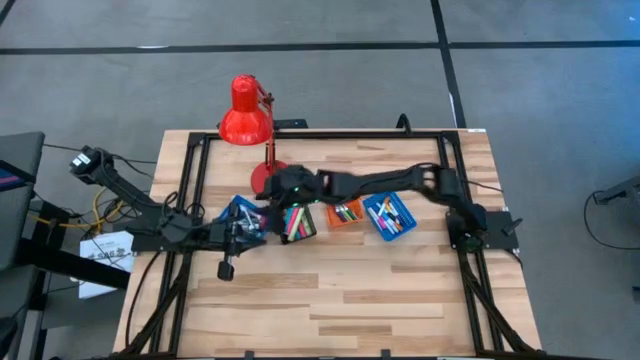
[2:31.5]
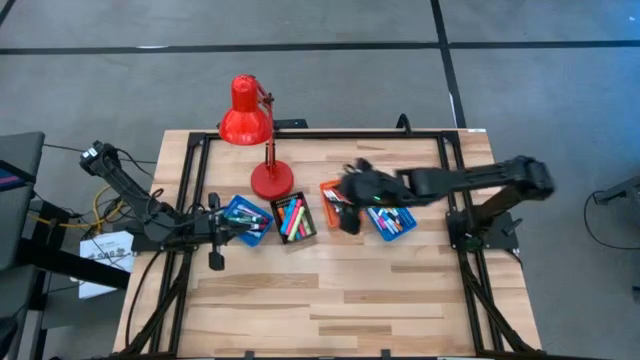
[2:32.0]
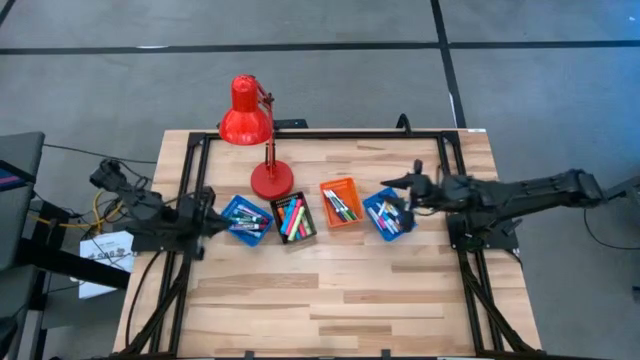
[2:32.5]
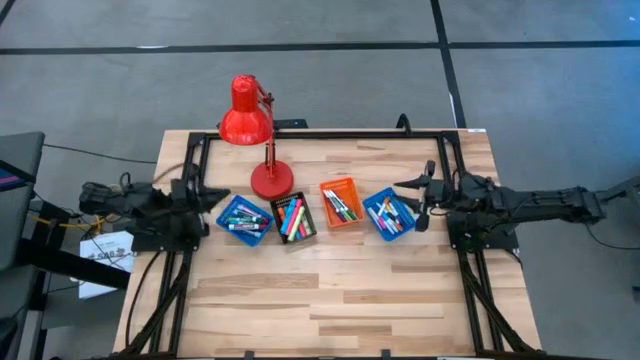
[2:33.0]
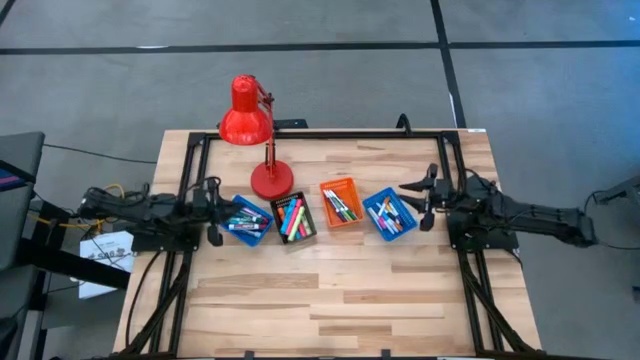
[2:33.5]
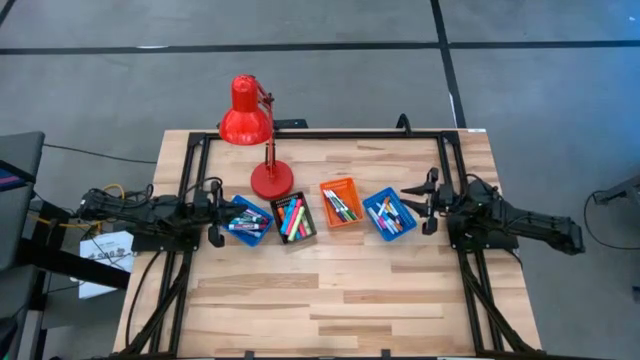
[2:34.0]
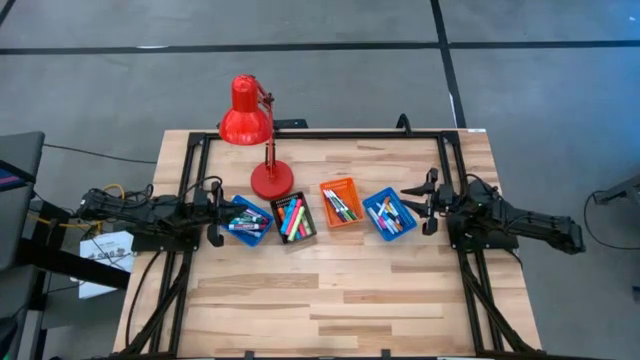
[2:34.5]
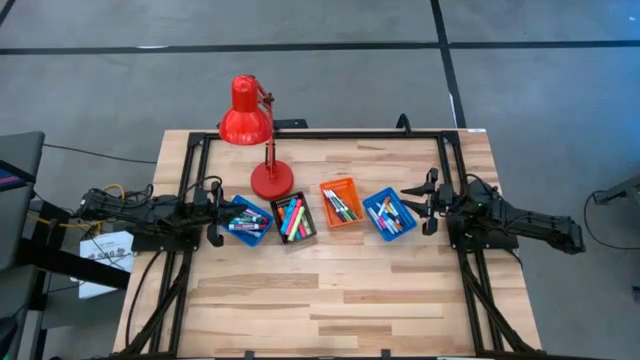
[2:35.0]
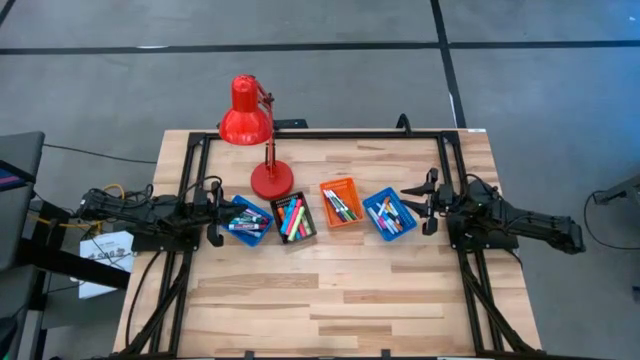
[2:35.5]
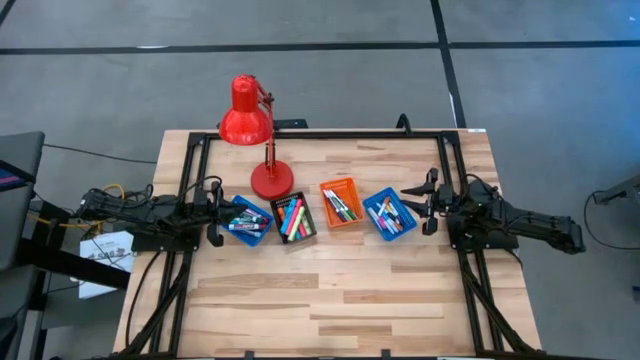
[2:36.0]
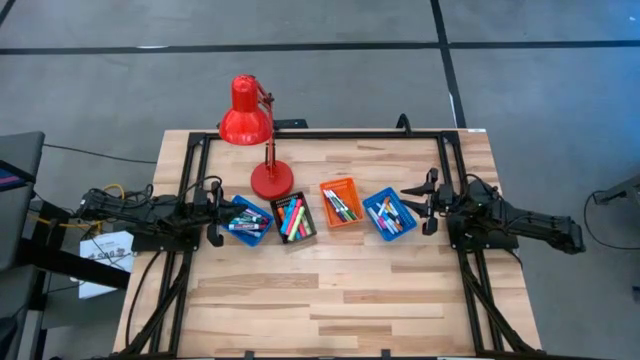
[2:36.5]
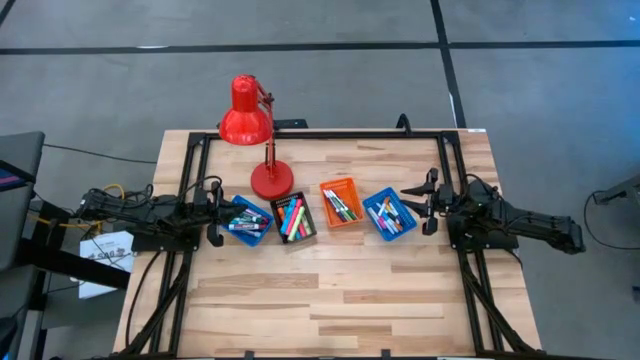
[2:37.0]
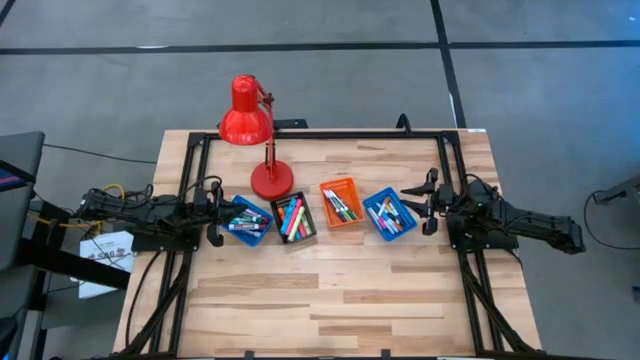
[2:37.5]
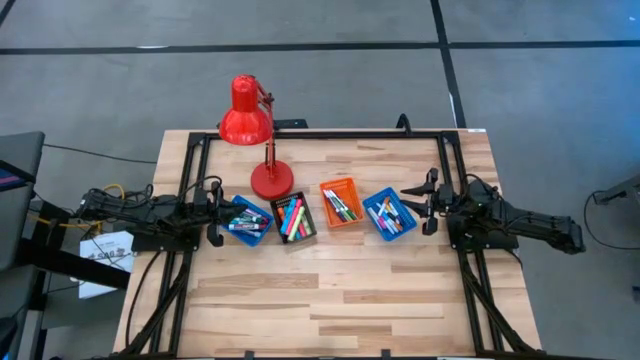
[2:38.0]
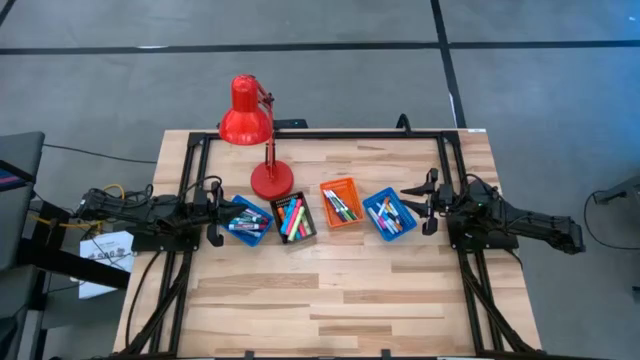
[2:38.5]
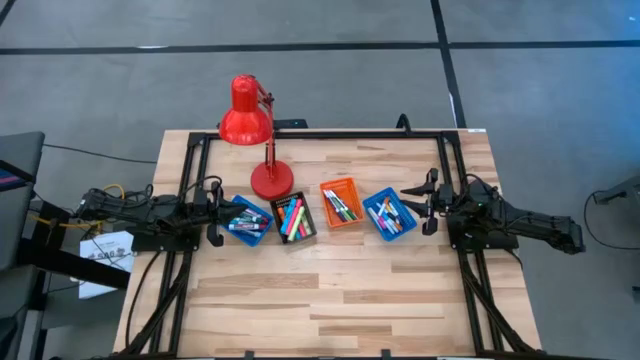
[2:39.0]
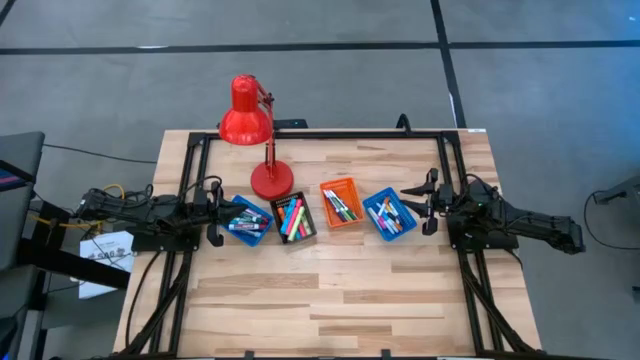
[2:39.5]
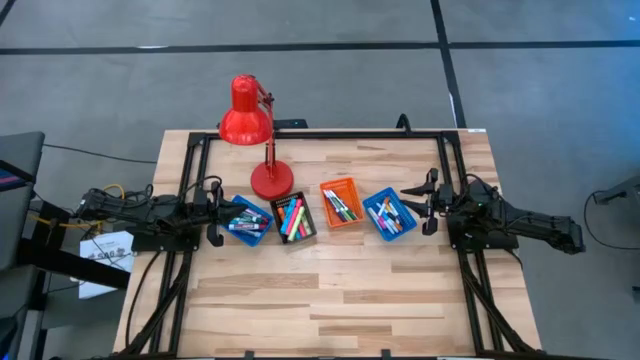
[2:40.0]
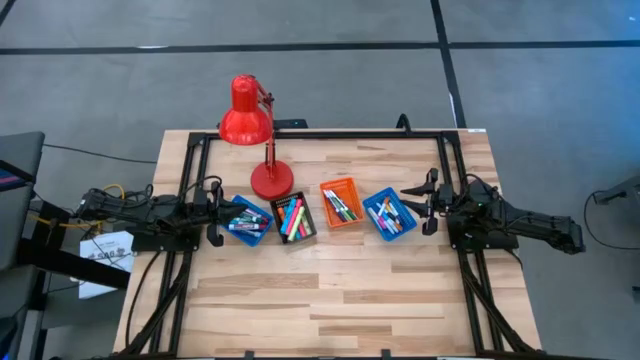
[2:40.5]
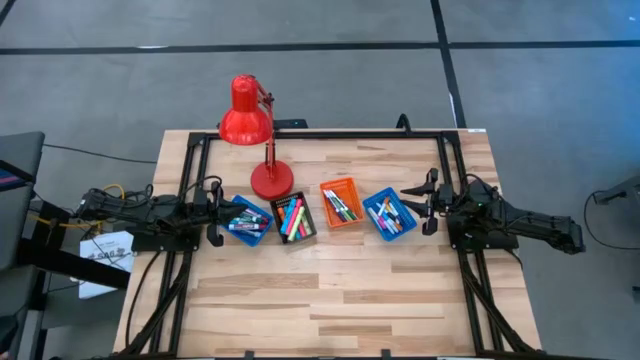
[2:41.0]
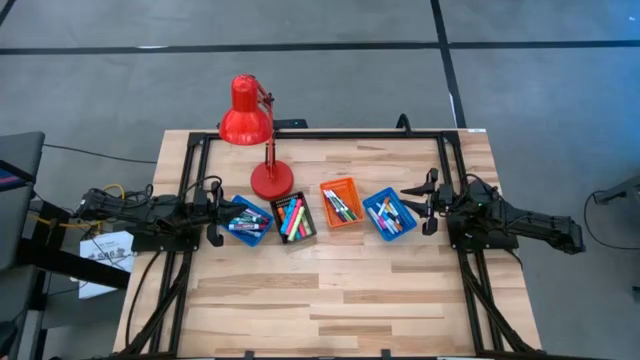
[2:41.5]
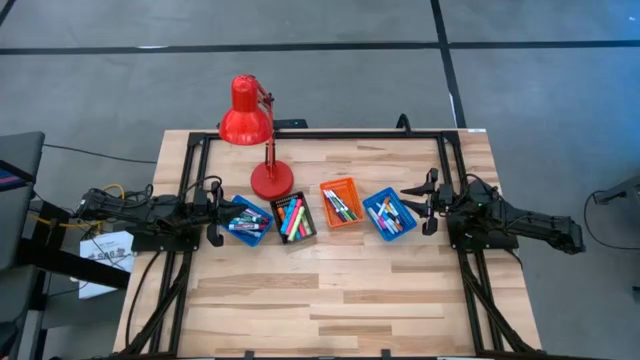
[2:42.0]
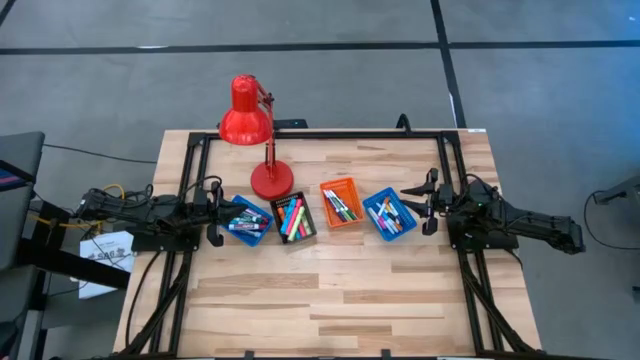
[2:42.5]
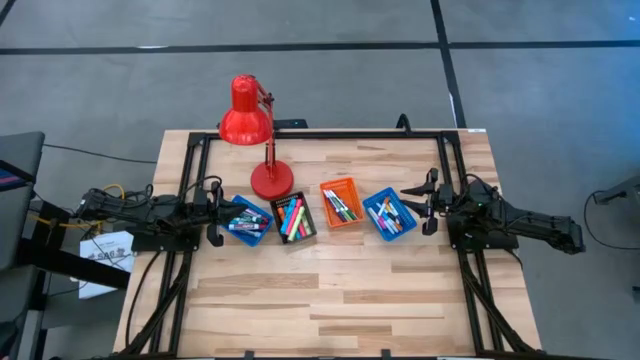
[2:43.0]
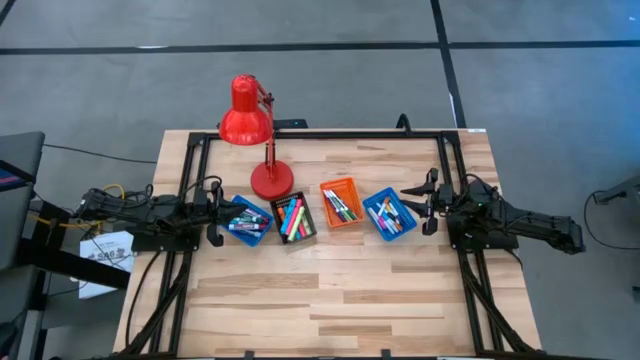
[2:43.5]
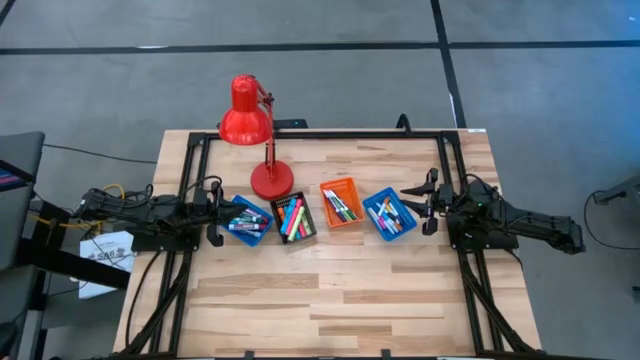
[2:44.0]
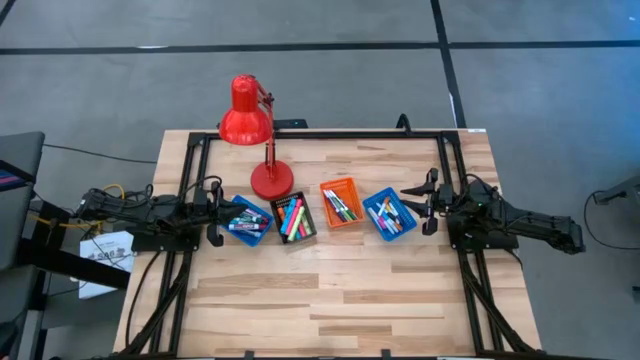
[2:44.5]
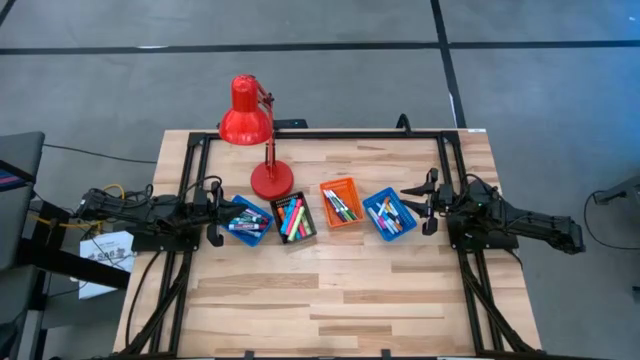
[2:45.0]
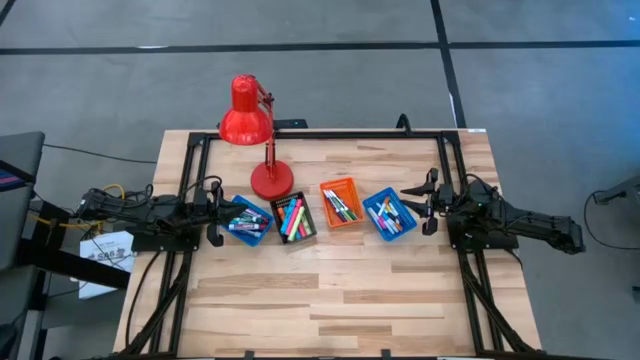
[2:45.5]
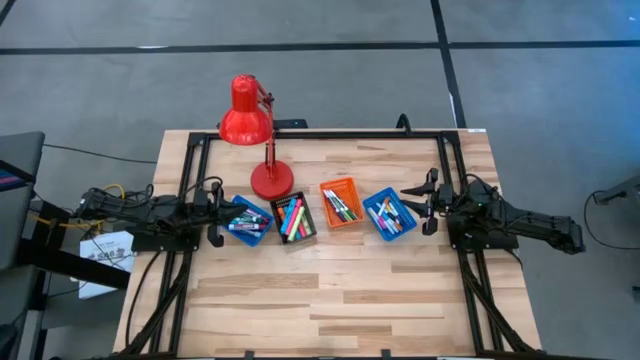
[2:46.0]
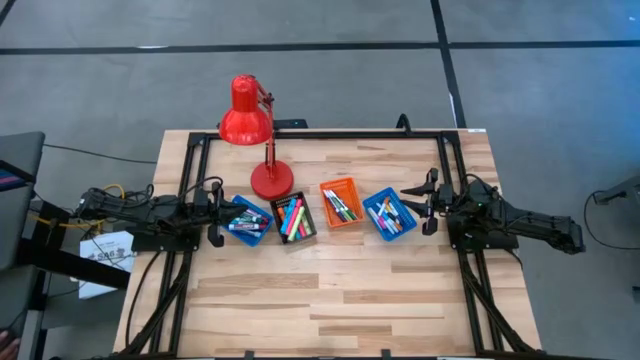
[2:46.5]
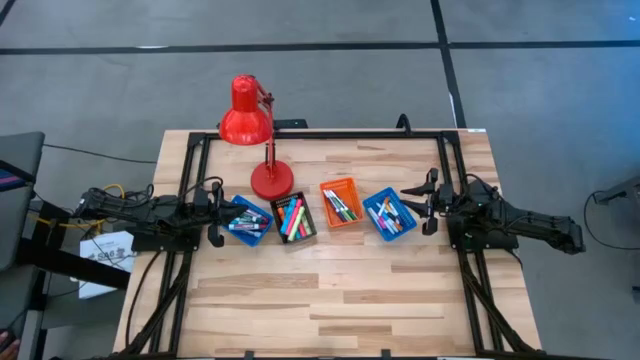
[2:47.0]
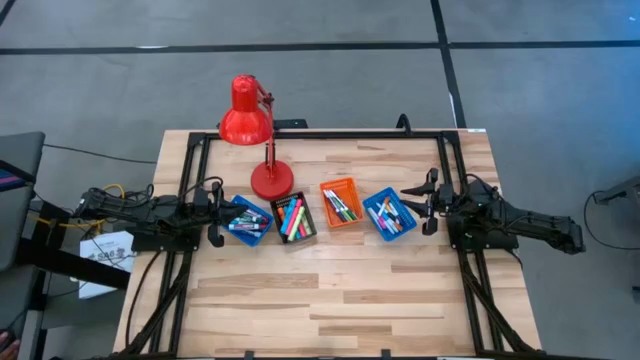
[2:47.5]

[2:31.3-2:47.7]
Task: Pick & Place Markers
Return to Home Position

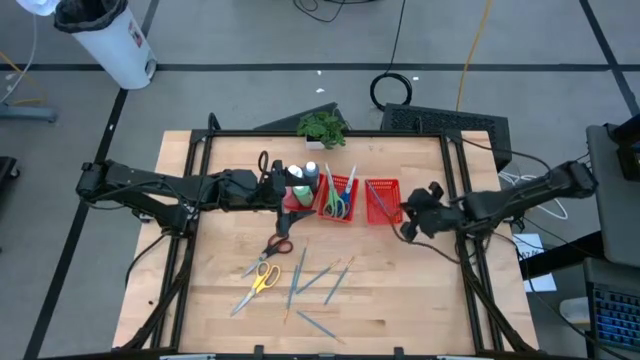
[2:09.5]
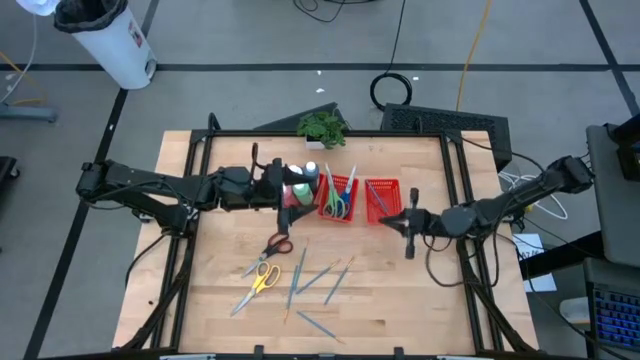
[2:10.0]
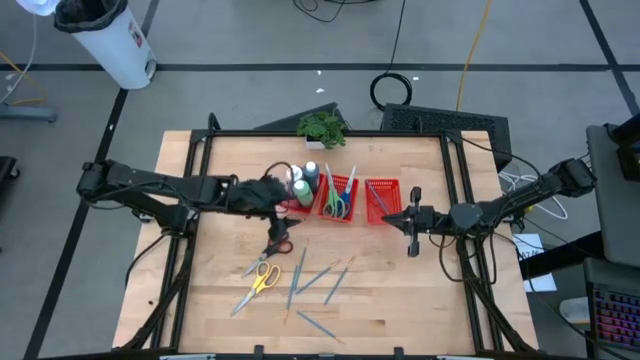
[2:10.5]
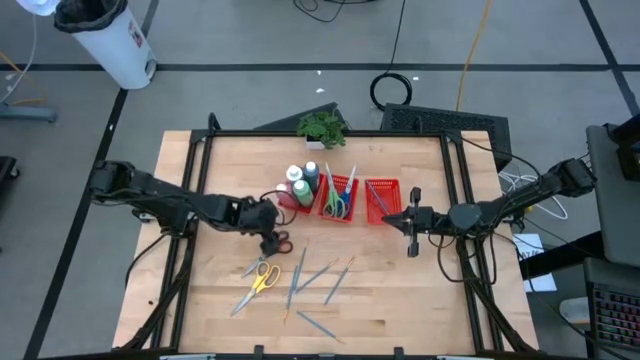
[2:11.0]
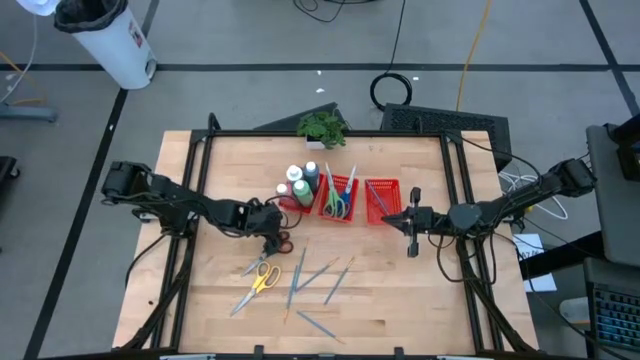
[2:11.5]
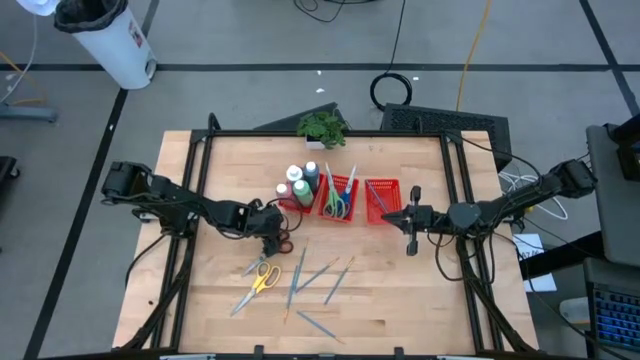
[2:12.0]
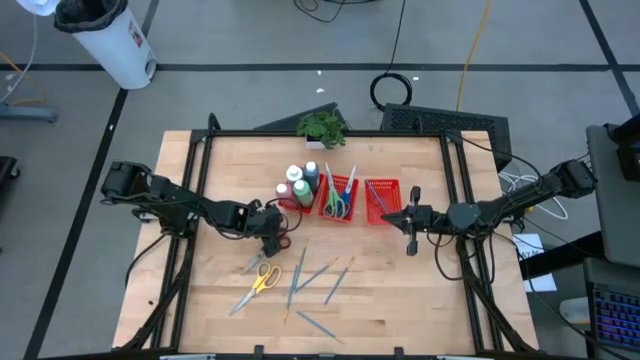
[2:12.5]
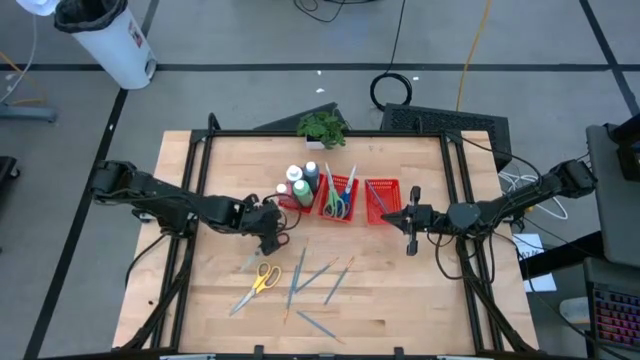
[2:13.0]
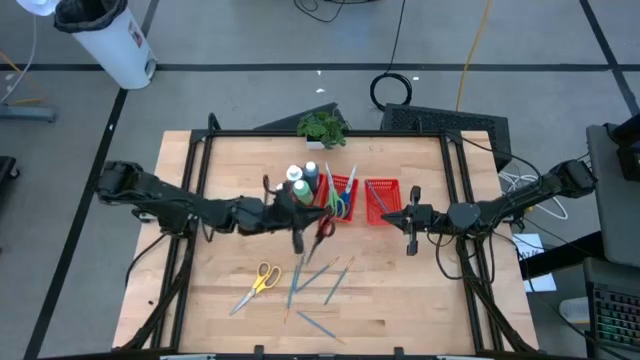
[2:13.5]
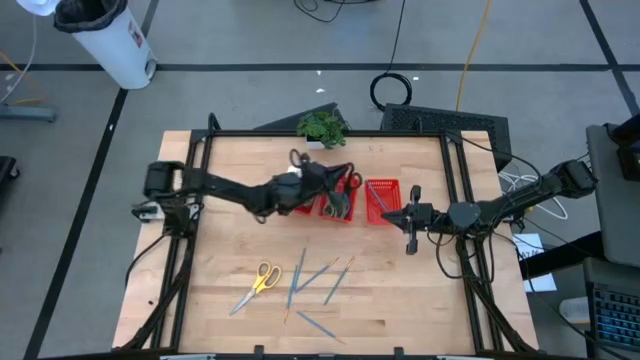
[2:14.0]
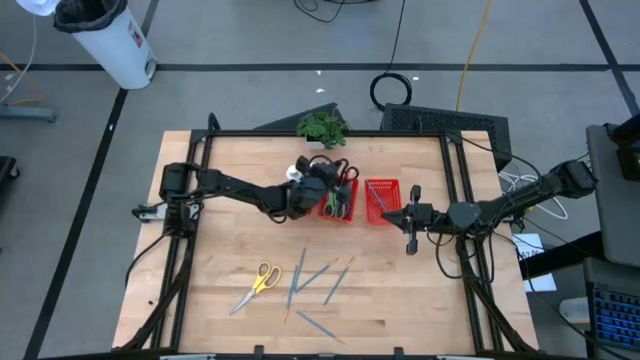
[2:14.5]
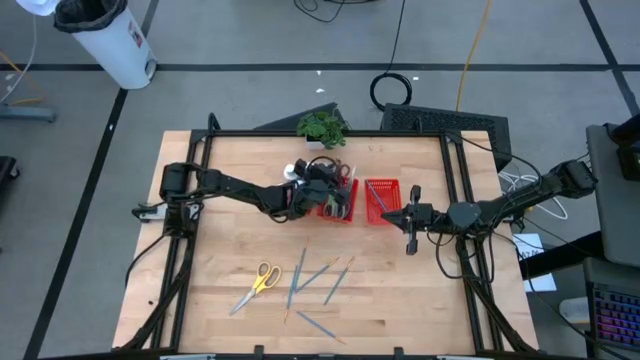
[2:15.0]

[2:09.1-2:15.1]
Task: Pick & Place Paint Supplies
Put the black scissors into the middle red bin
